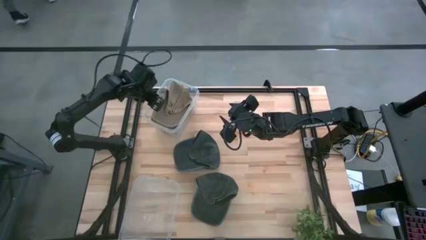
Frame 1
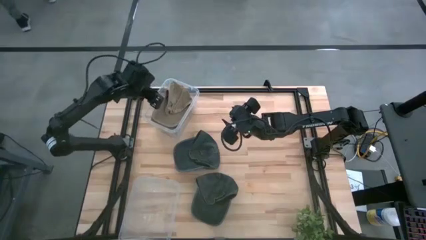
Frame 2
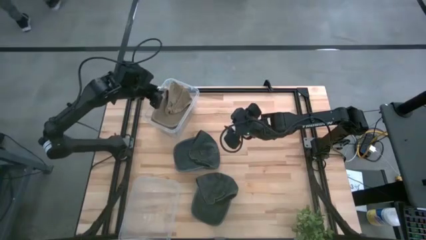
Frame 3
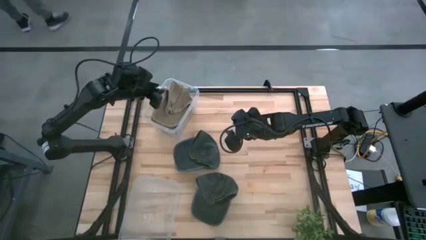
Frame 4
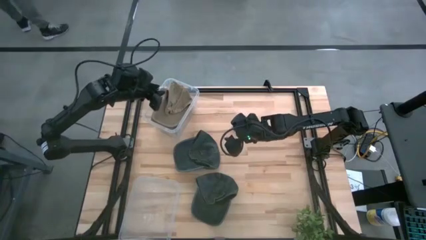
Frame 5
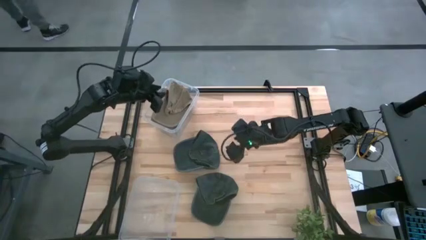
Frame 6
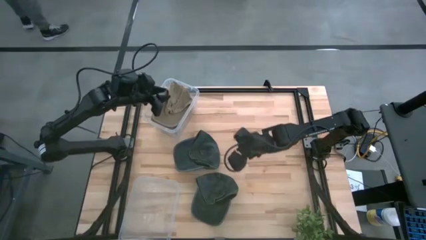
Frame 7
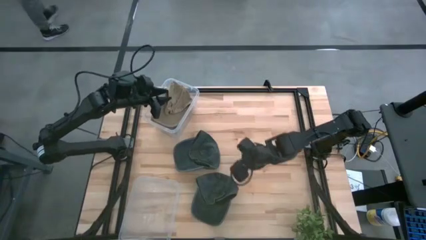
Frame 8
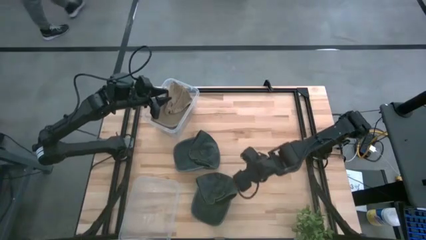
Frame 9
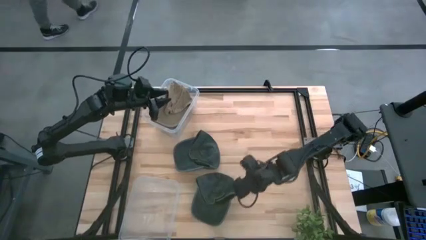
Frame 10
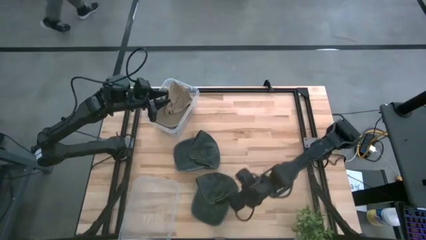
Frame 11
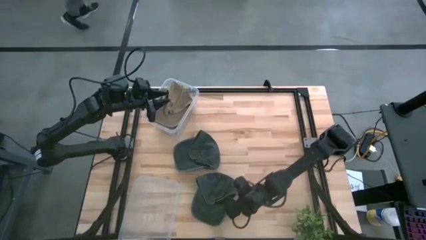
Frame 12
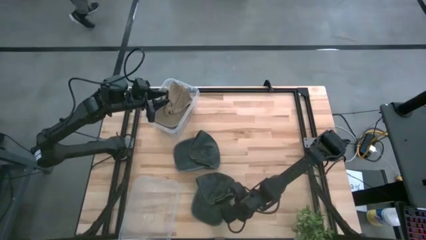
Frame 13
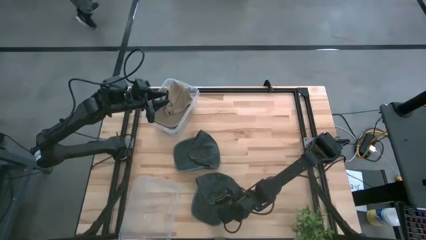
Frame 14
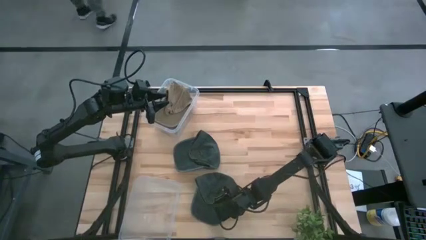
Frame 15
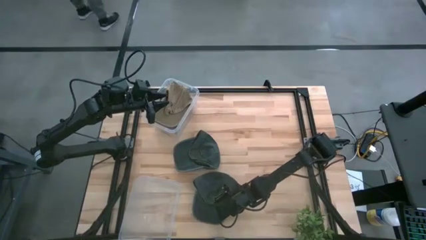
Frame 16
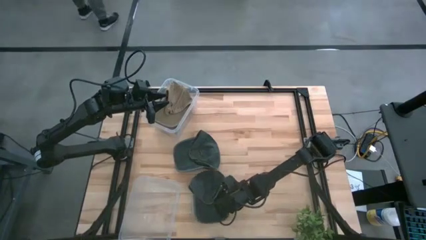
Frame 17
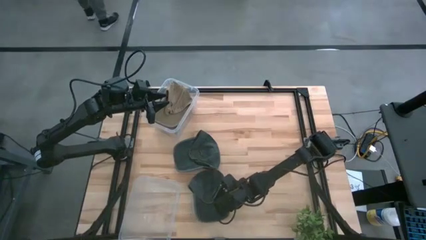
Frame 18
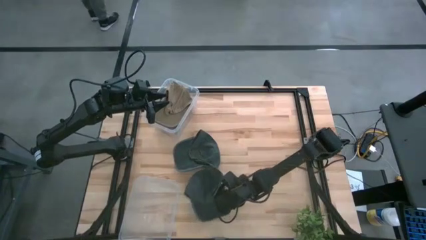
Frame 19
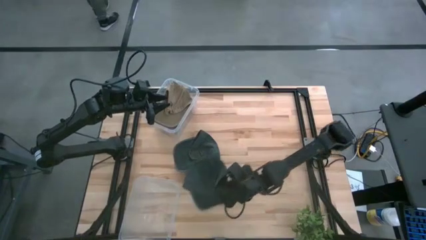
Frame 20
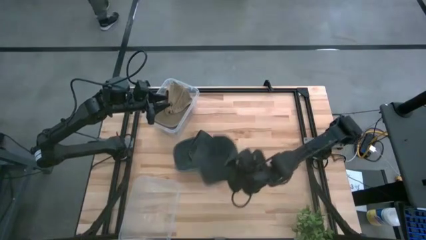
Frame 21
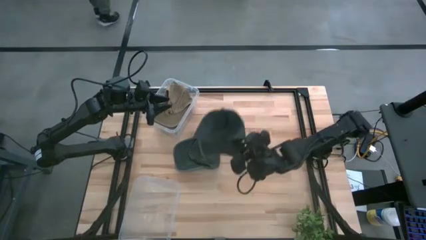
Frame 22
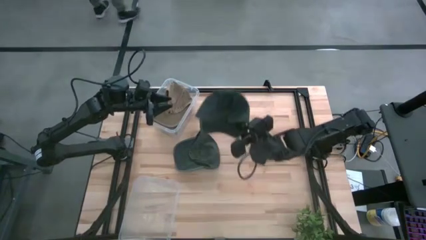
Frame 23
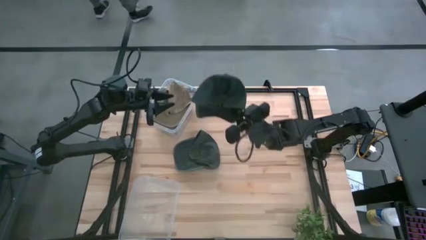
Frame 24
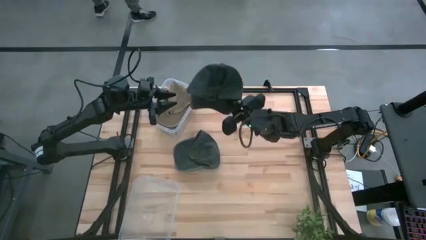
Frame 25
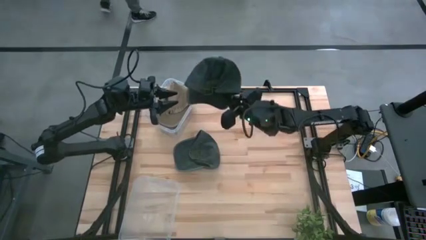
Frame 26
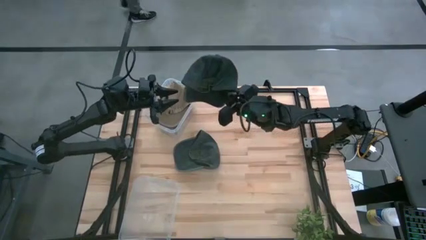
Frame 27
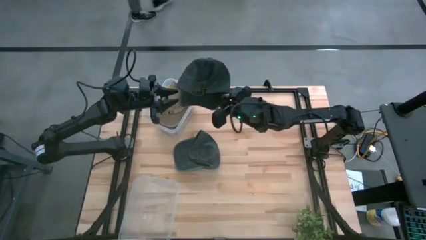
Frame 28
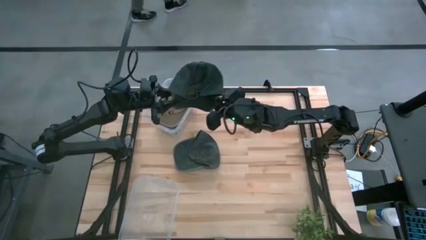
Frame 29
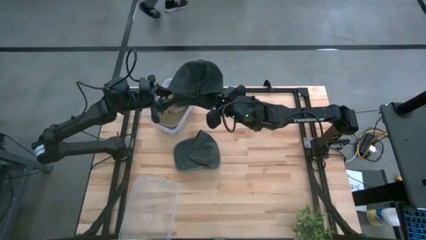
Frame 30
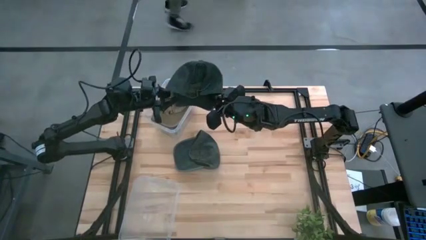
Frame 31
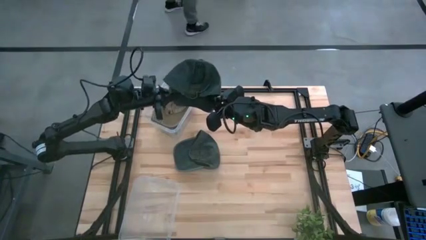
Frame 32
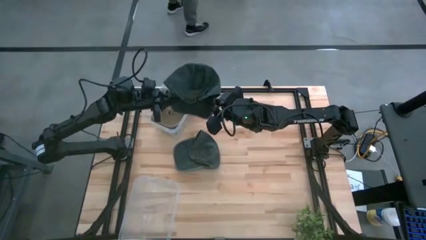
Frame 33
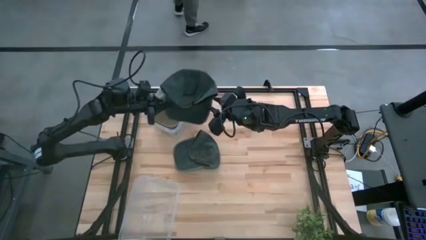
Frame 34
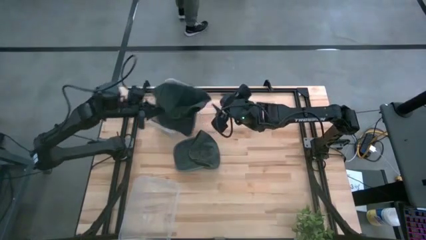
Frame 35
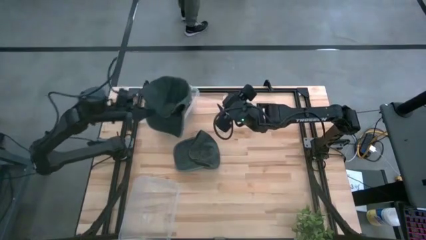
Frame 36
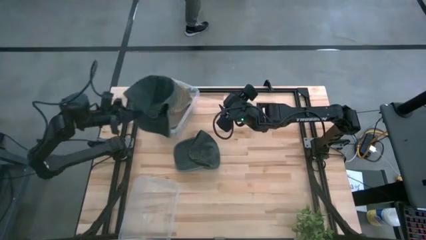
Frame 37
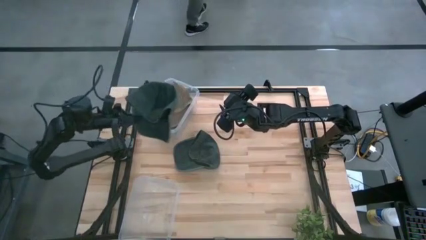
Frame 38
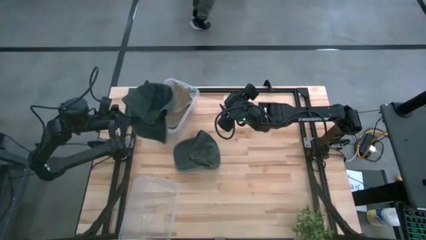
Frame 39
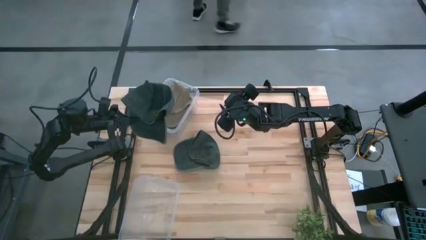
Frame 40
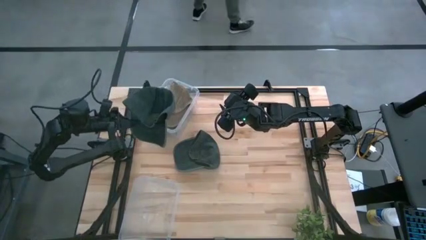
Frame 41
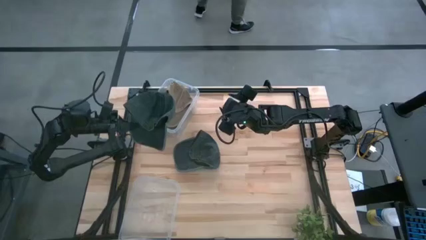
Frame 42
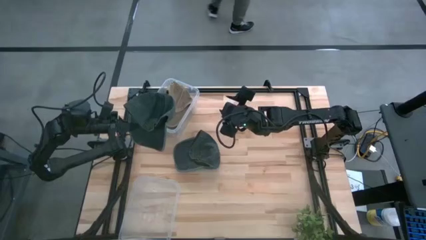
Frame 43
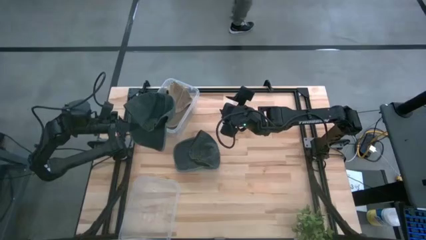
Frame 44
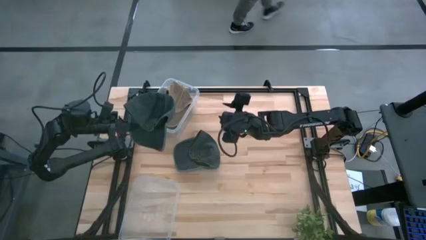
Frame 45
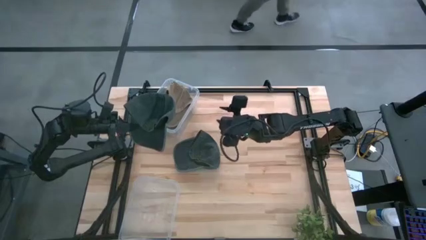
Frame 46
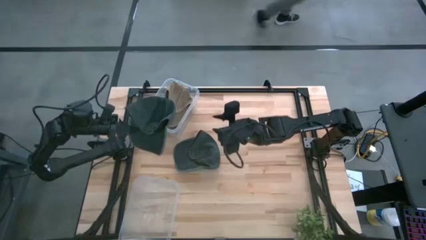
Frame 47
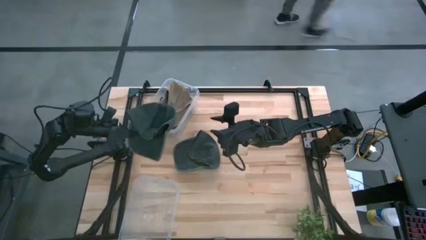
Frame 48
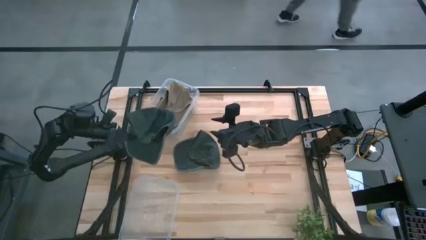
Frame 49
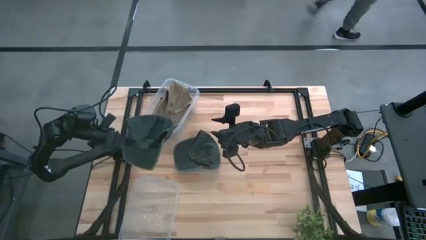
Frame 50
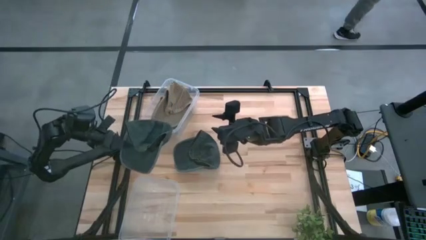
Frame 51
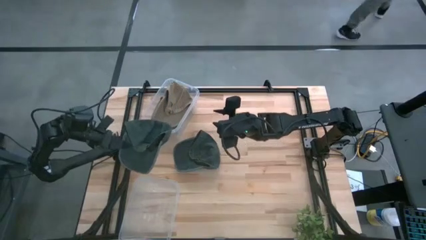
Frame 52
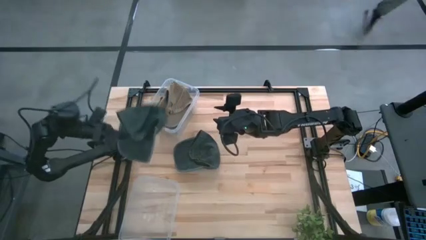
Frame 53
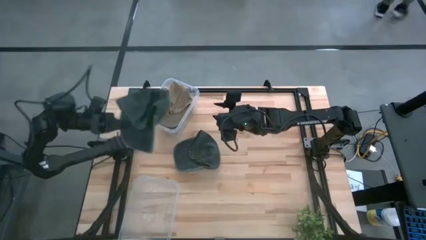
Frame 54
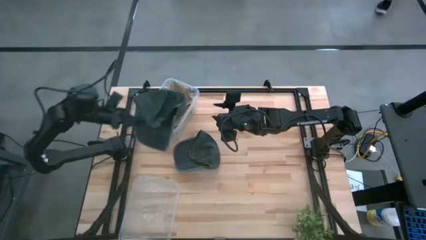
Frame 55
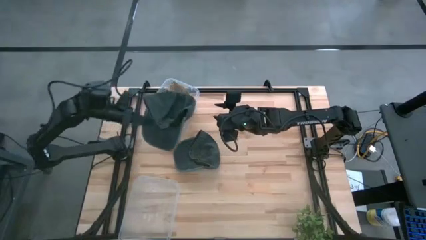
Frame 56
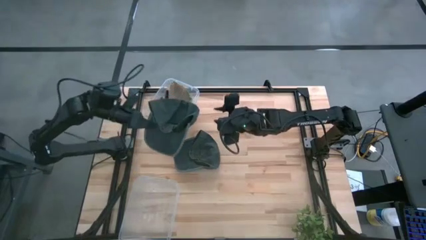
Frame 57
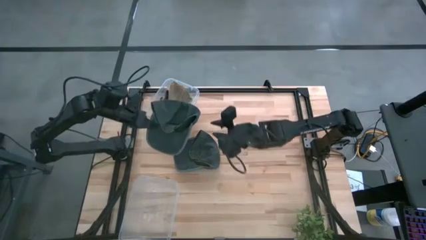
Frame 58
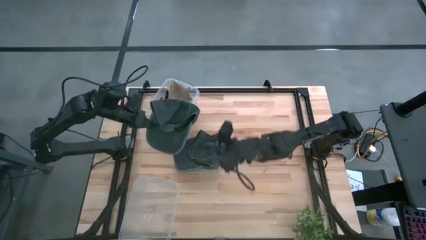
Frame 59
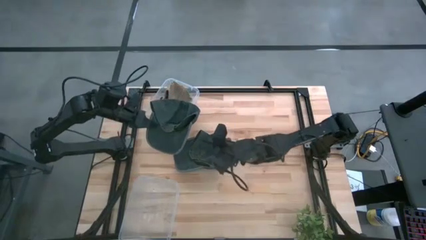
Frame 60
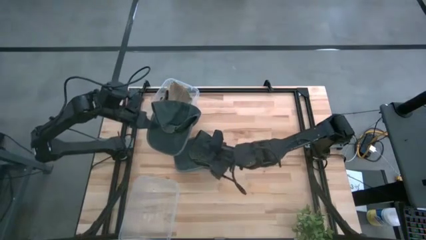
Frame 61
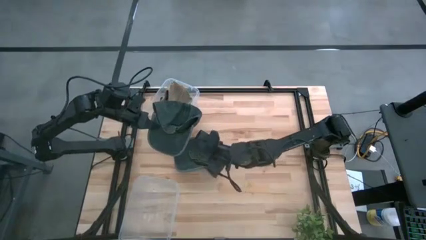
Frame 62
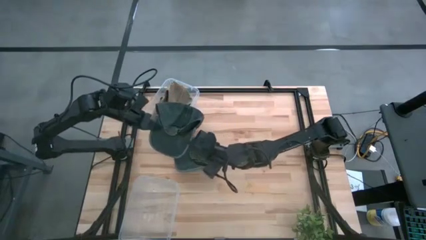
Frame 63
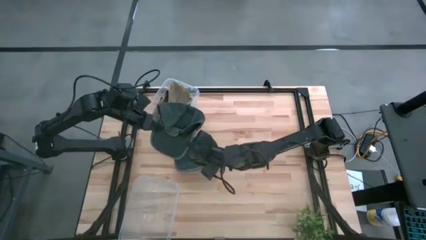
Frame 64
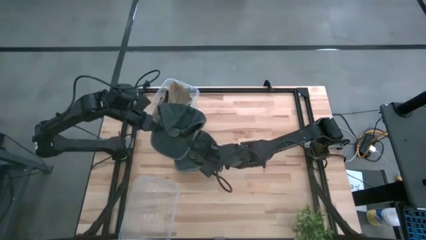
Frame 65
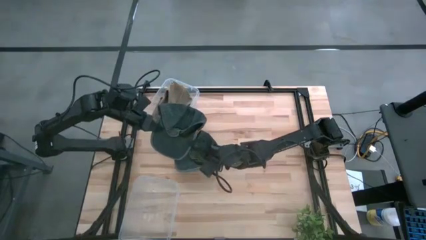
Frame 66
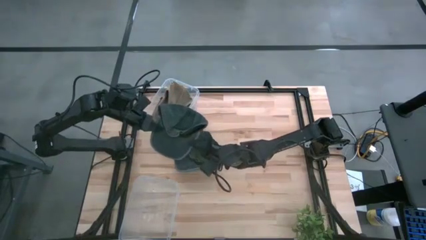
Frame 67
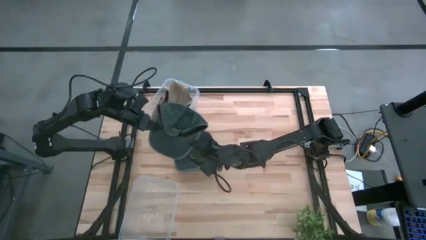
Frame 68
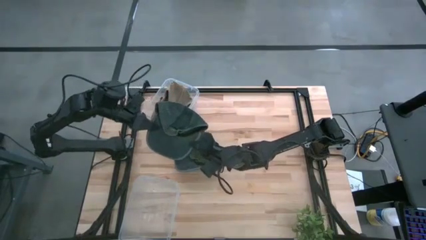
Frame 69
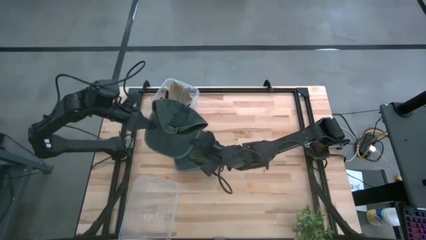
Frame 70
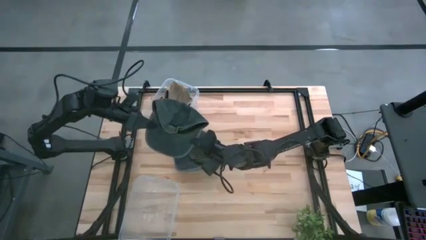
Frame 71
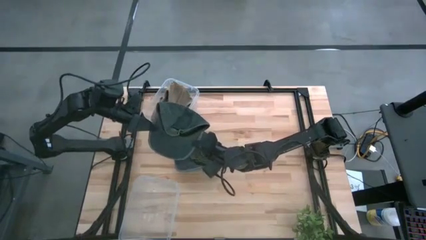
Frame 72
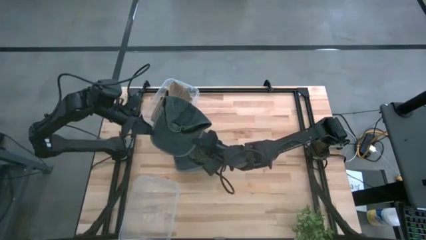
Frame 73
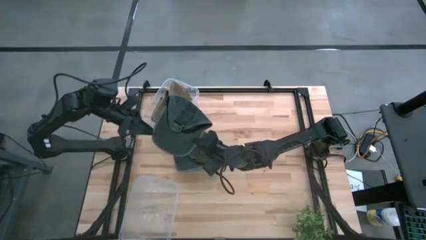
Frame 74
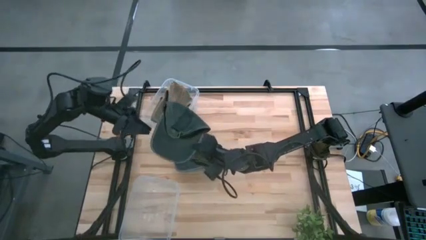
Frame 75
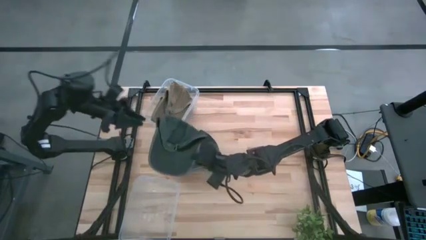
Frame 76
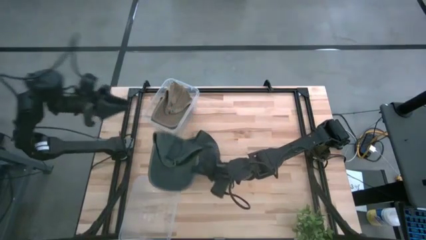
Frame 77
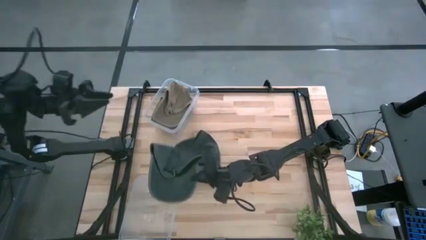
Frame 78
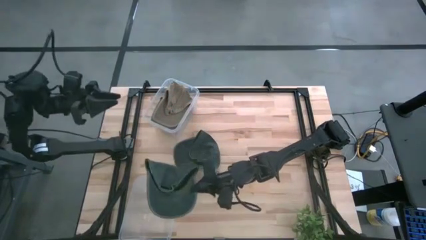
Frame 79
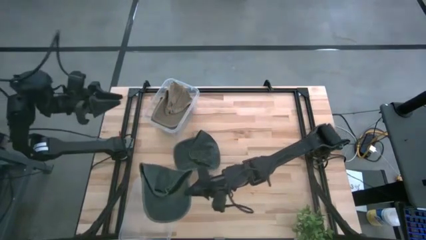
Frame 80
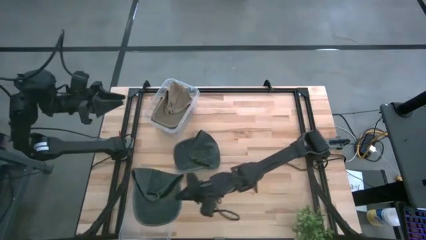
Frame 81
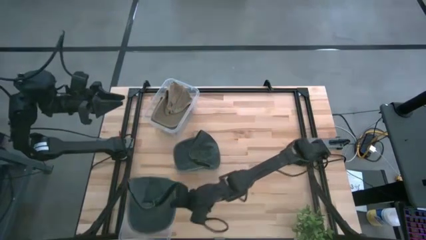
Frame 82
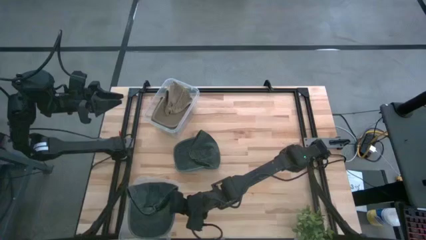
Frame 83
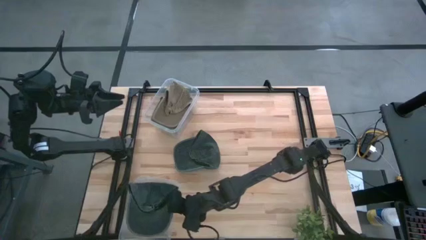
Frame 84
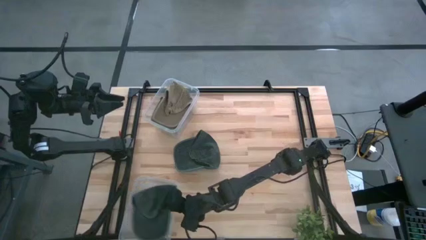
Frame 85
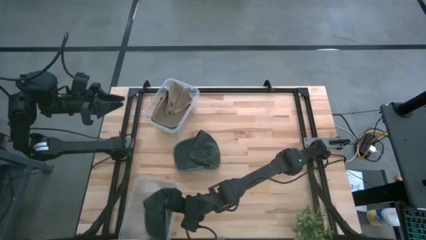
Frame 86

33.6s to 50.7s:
Task: Pick and place caps into container
Put the bottom black cap into the bottom transparent container
